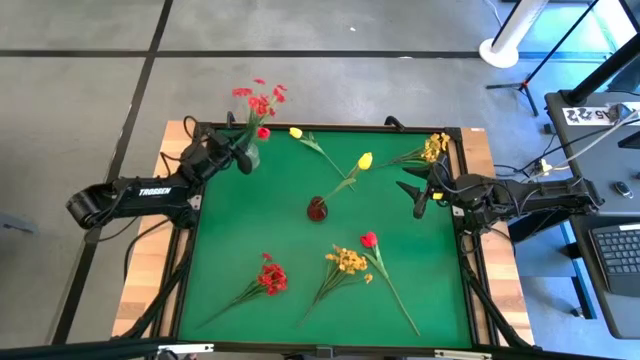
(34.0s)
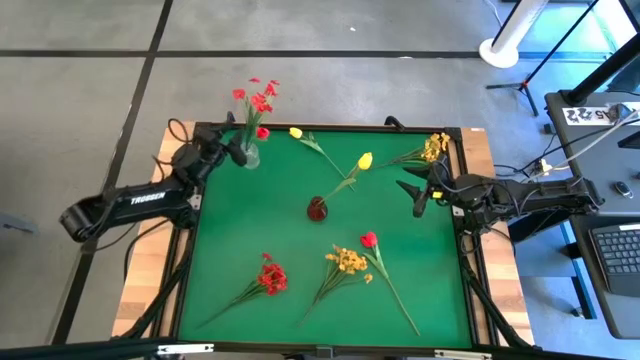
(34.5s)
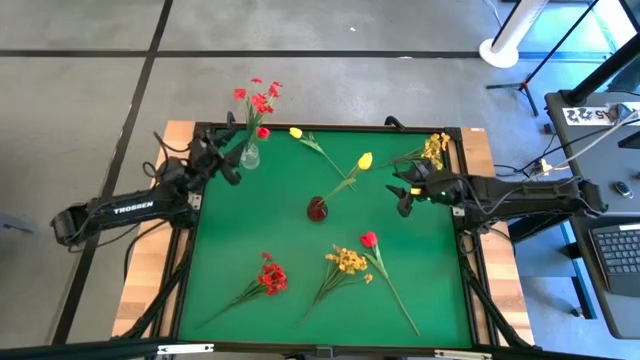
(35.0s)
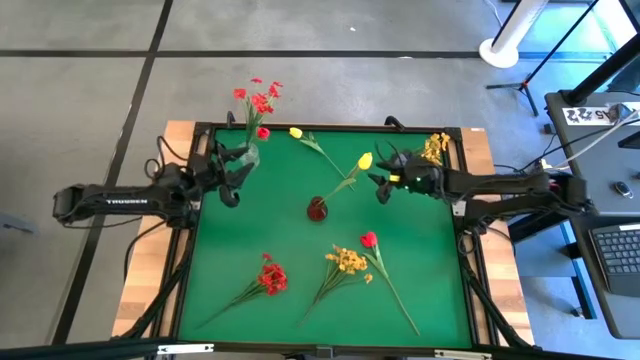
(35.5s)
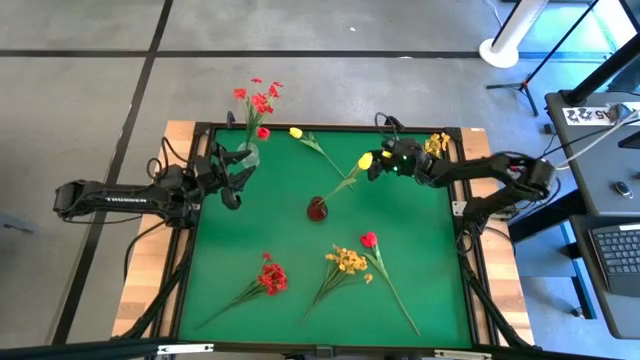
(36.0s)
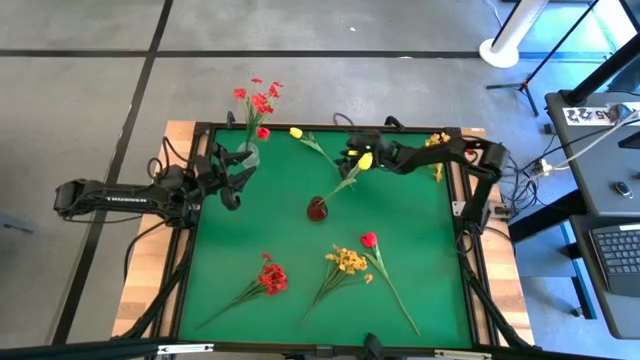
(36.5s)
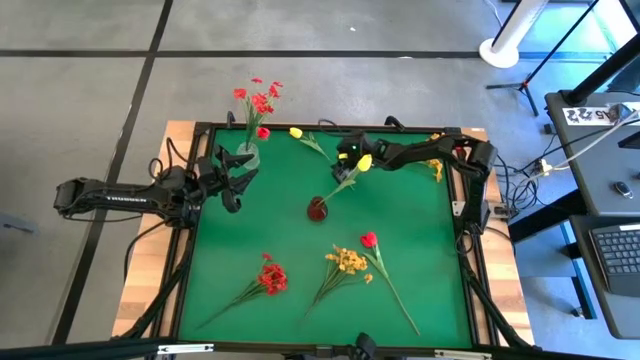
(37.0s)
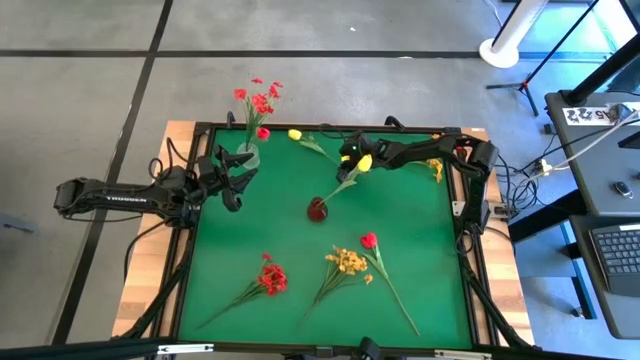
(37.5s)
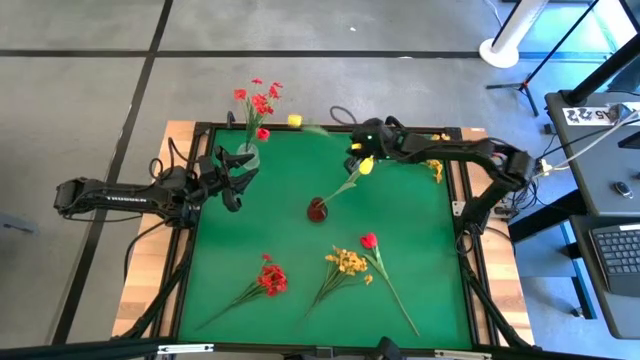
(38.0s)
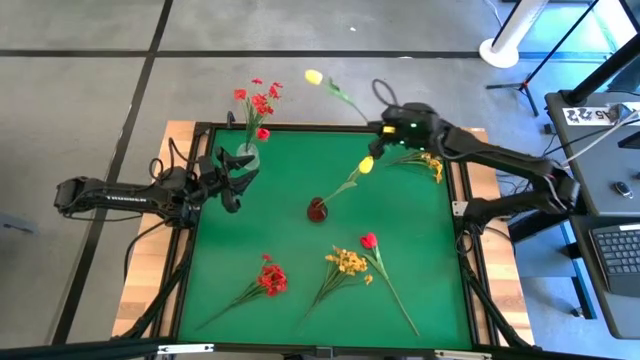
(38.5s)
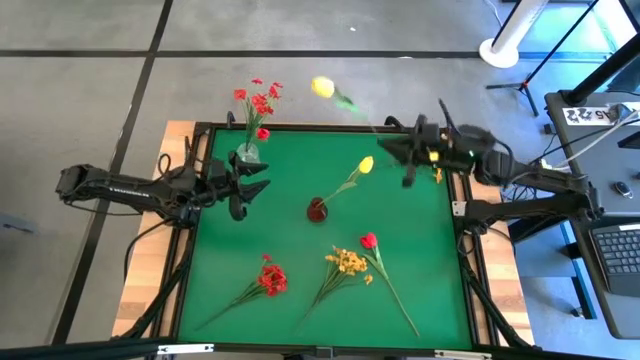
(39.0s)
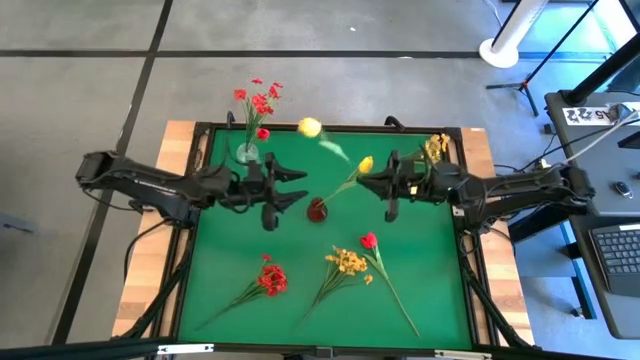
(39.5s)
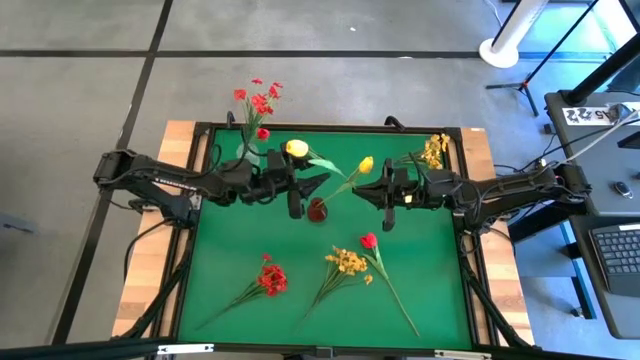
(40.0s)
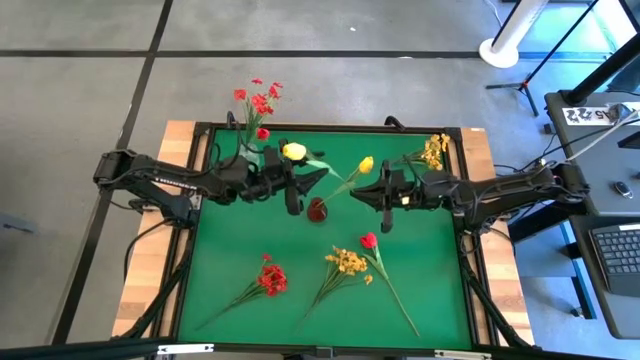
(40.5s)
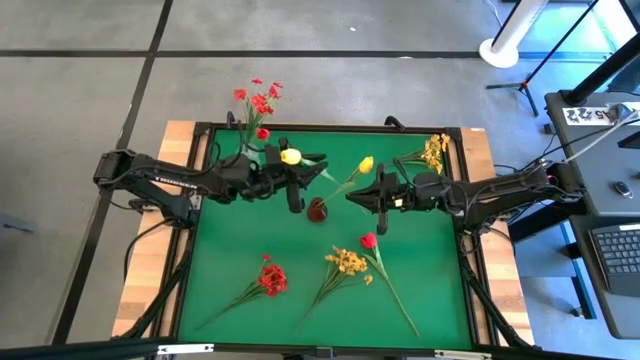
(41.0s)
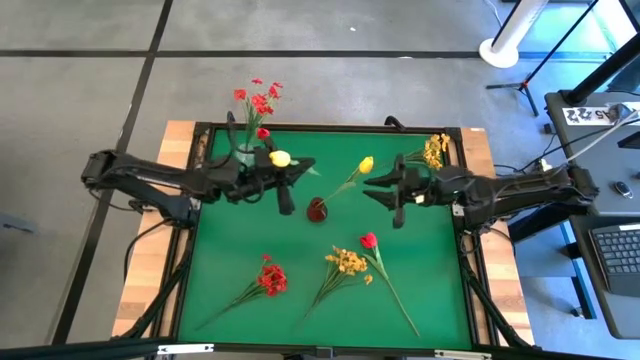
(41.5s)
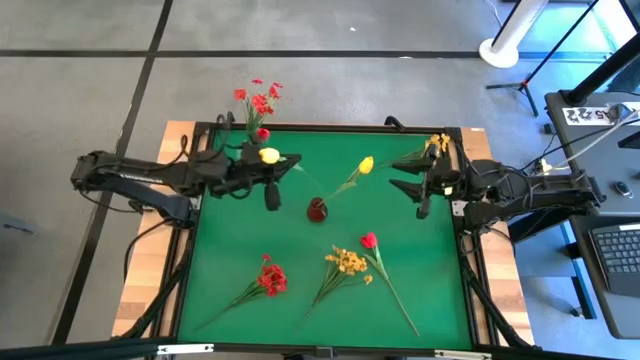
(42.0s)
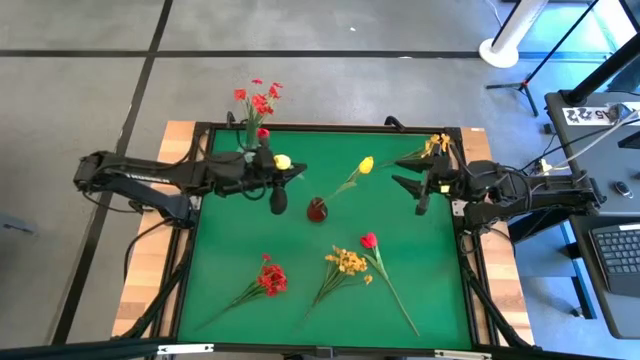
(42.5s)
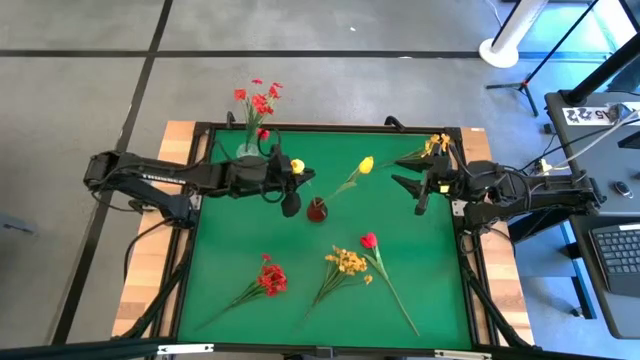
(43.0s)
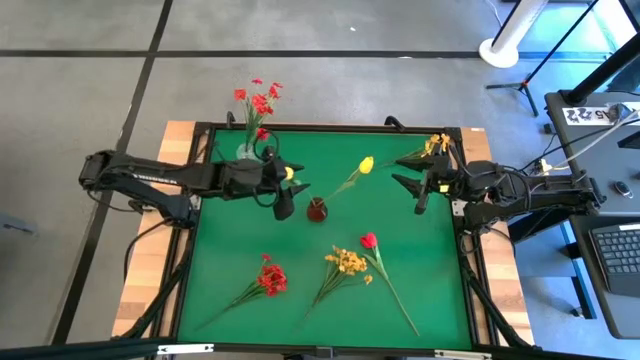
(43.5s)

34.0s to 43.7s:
Task: Sort flowers into vase by color
Put the yellow tulip into the red flower vase

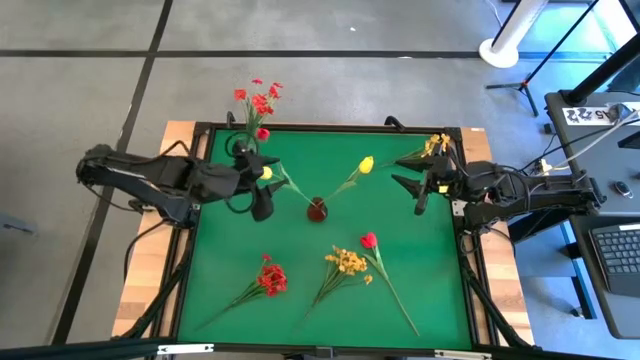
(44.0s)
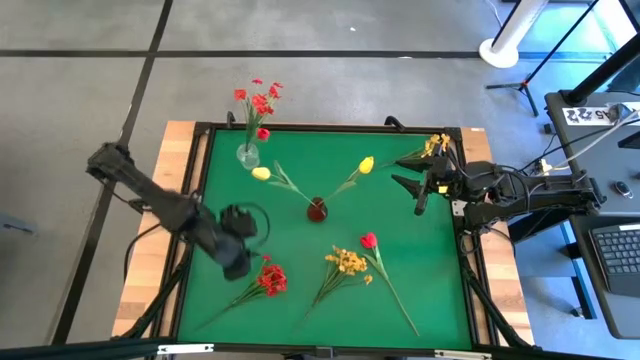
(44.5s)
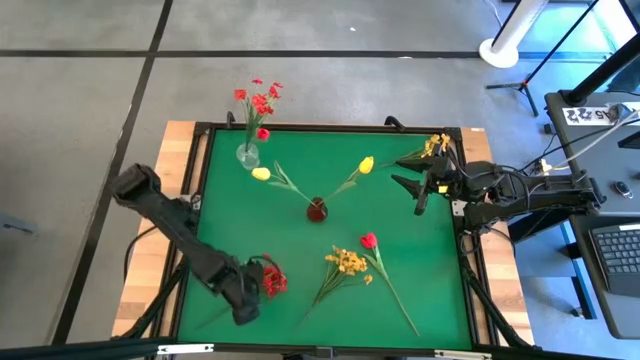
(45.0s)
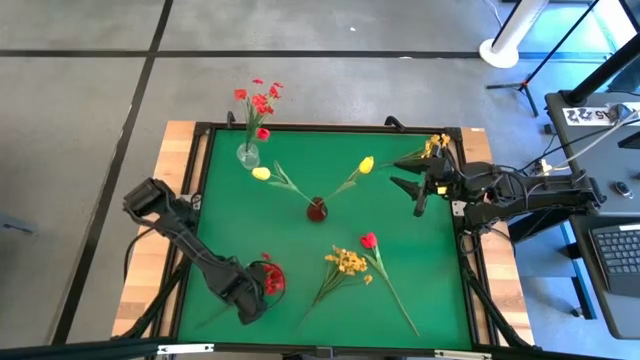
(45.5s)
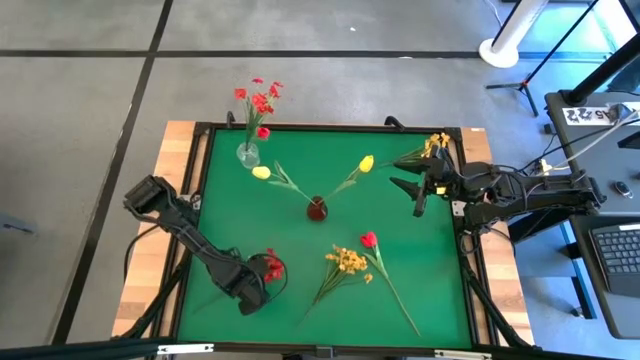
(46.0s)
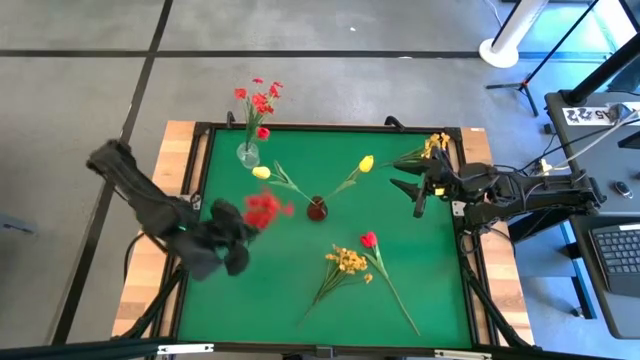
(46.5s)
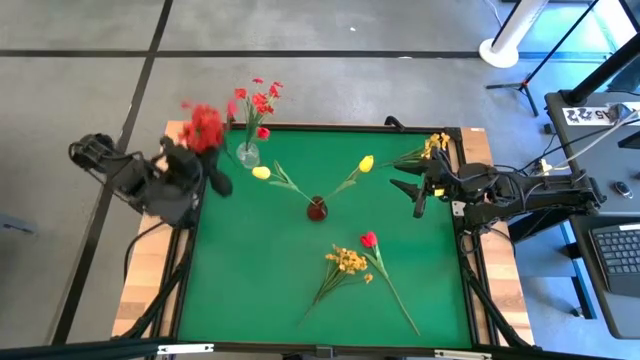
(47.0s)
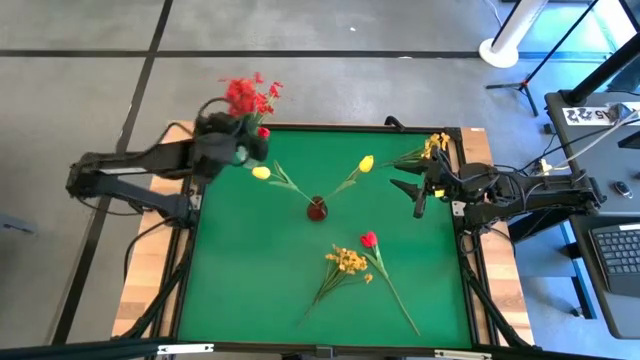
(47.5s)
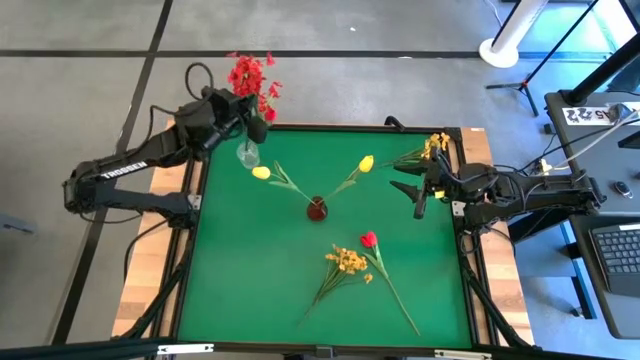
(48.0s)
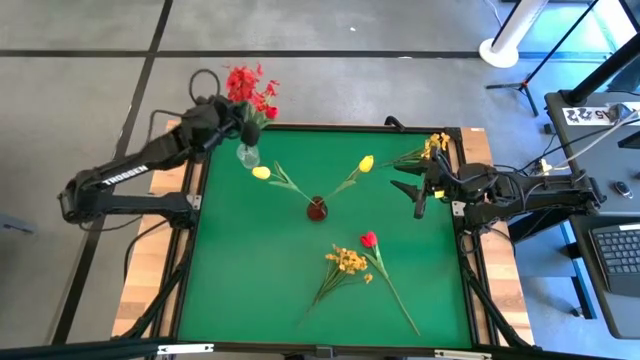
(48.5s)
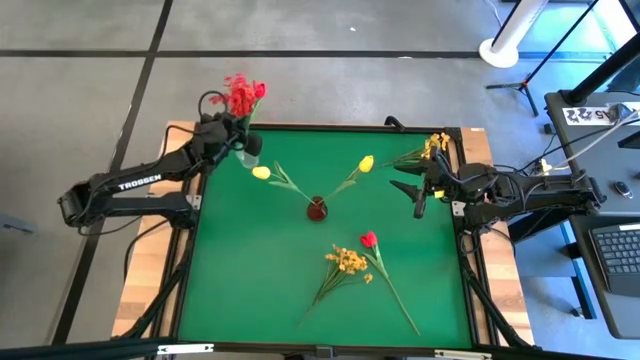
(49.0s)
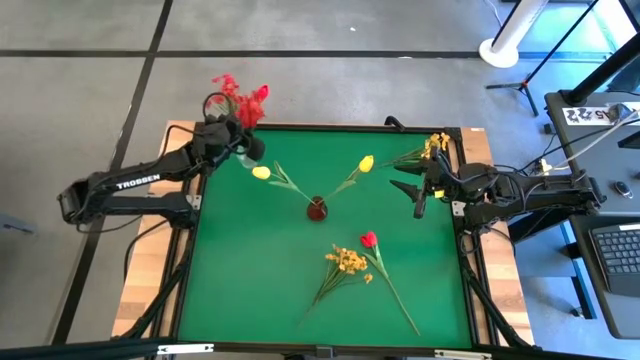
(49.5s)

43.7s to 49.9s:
Put the red flowers into the transparent flower vase

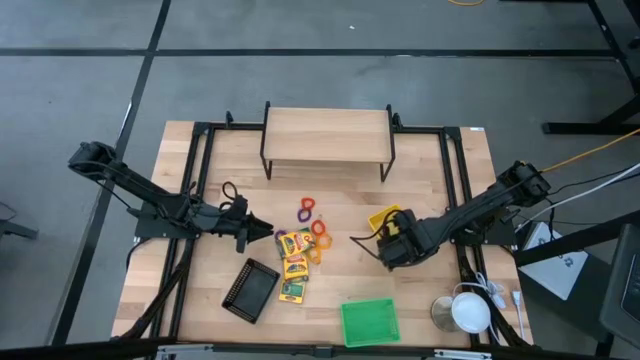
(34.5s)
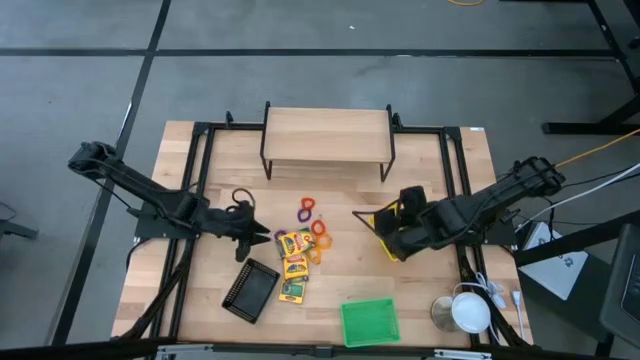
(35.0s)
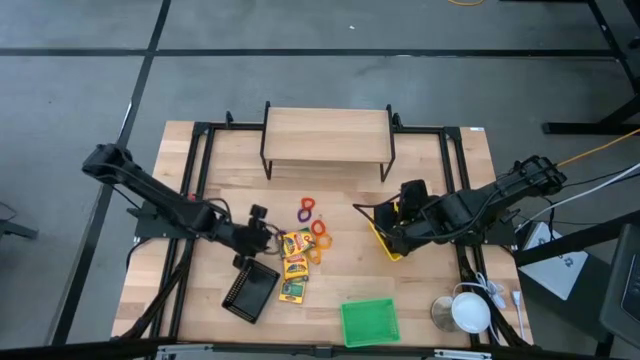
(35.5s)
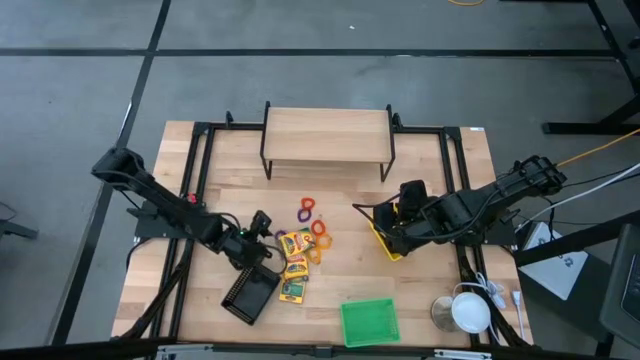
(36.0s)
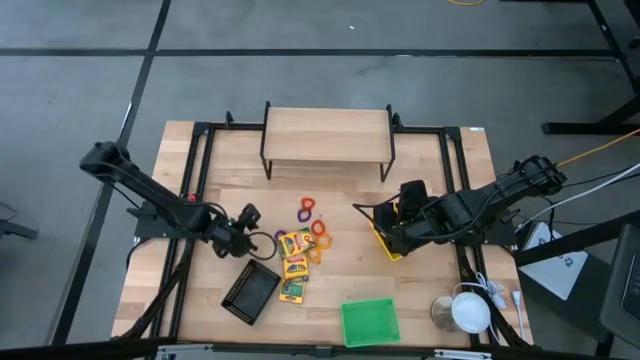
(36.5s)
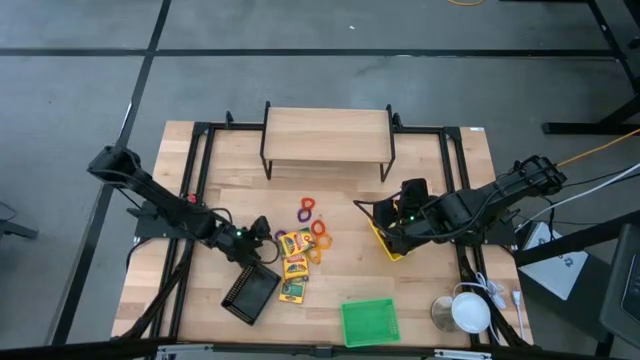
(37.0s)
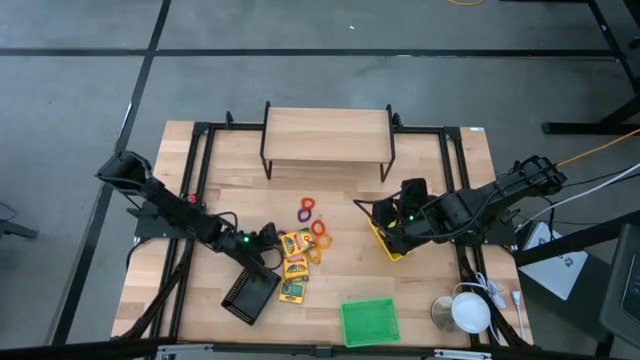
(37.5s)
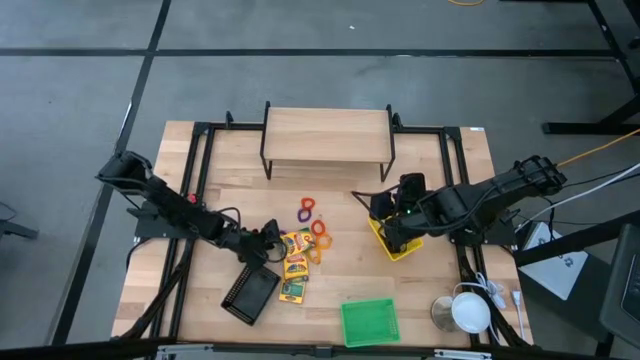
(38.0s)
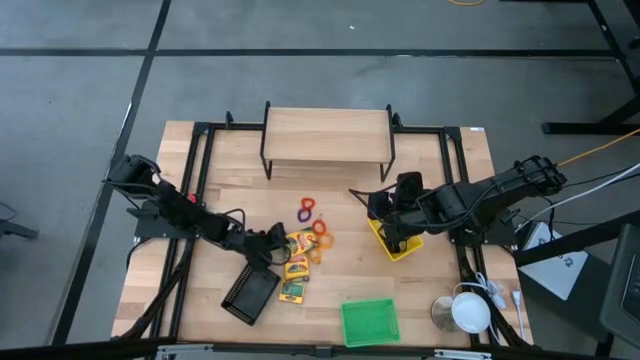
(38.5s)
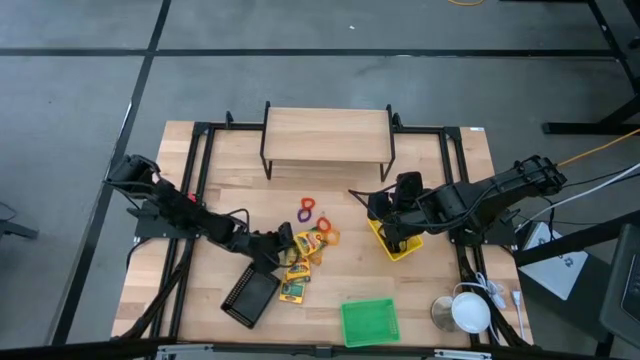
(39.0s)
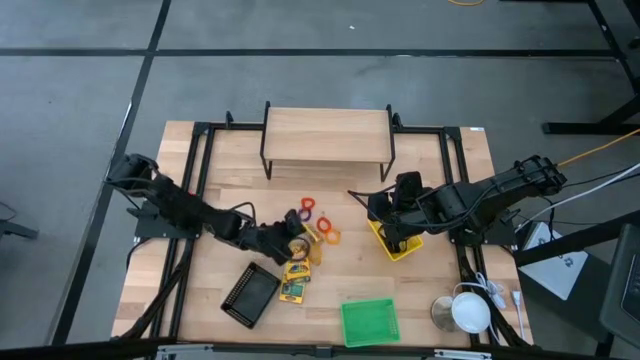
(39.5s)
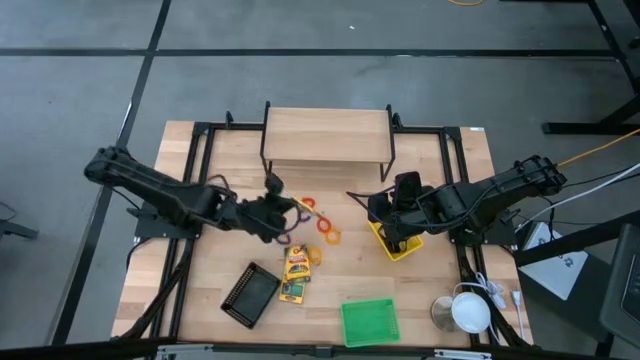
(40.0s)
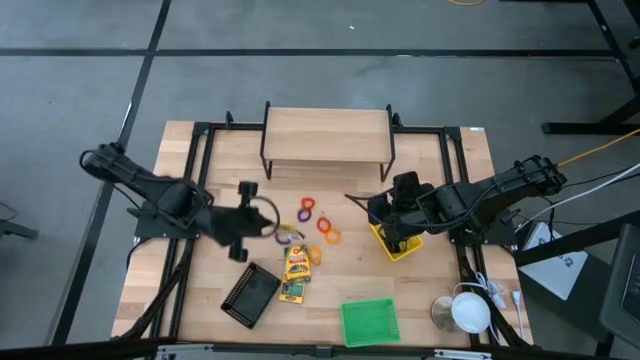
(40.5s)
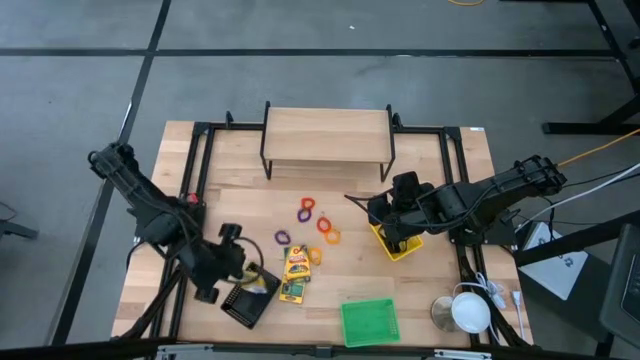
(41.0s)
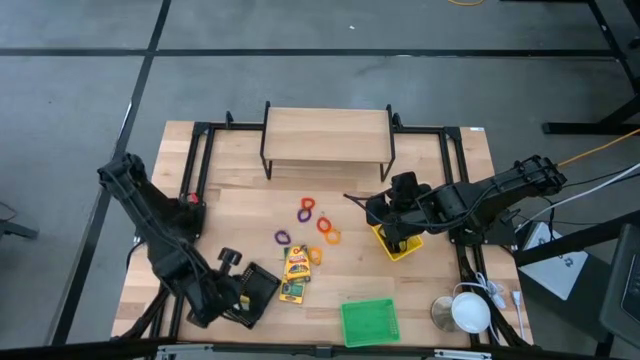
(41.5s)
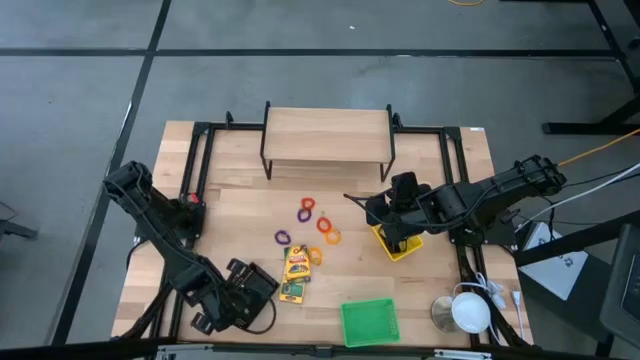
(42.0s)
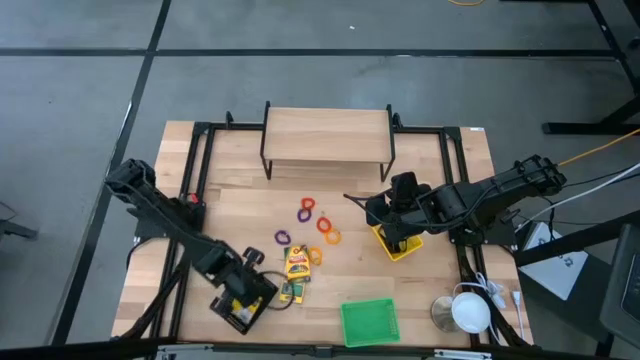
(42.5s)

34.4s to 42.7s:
Task: Pick & Place Office Desk Supplies
Put the yellow crayon box into the black basket
